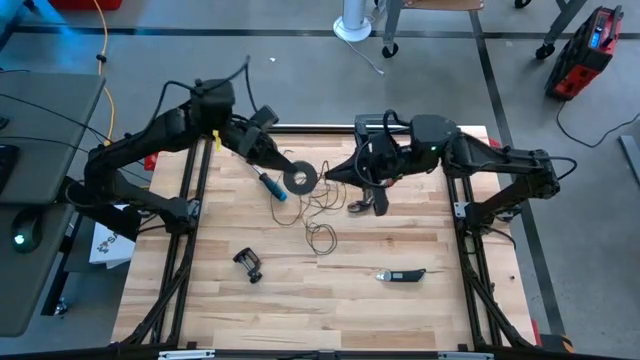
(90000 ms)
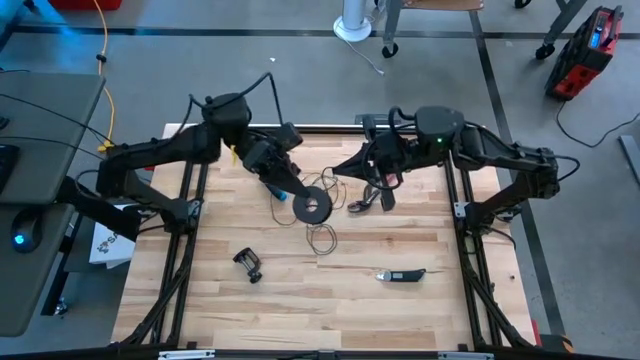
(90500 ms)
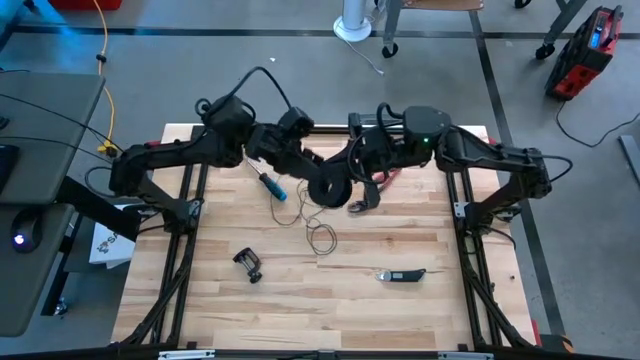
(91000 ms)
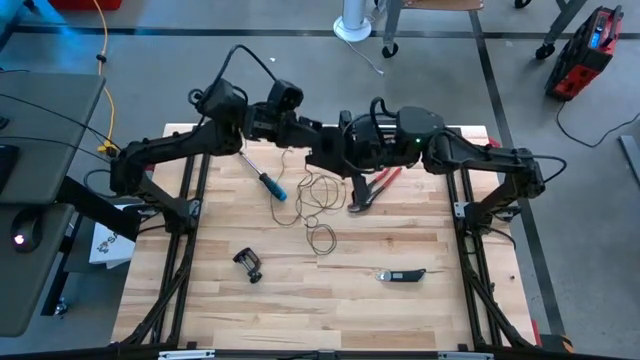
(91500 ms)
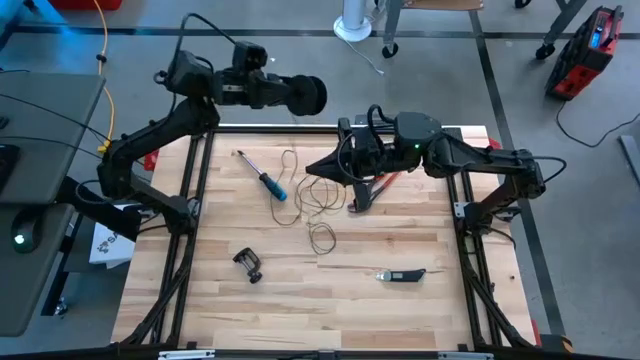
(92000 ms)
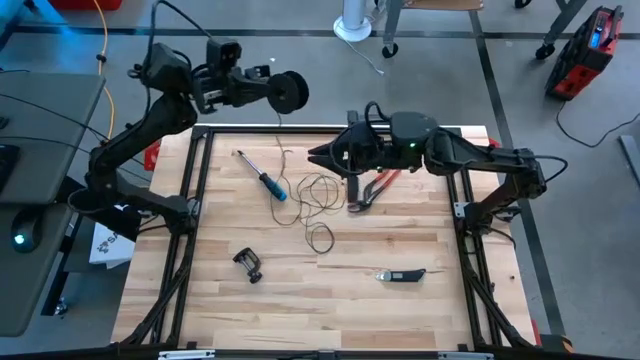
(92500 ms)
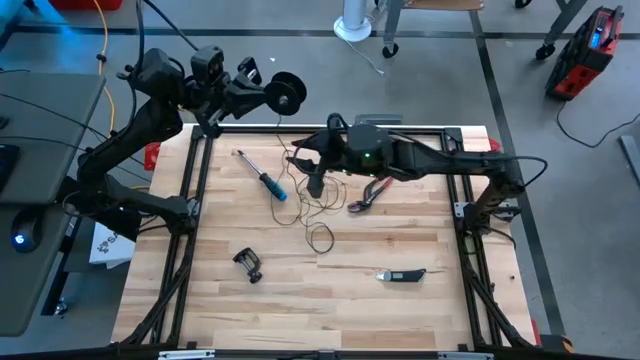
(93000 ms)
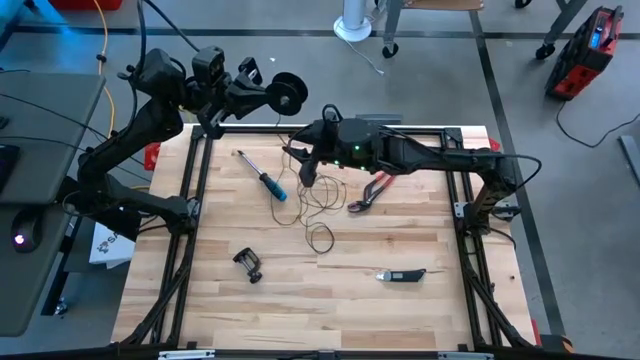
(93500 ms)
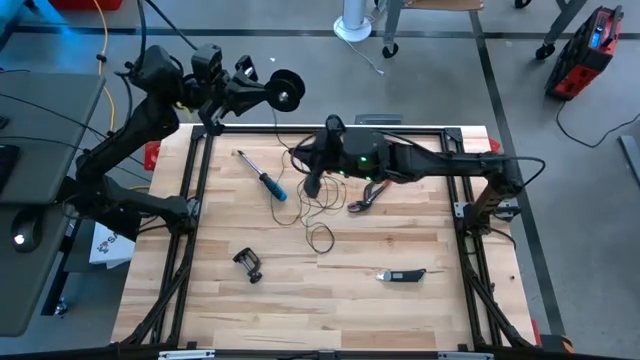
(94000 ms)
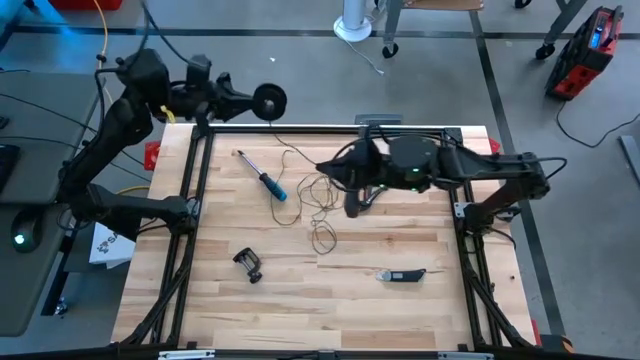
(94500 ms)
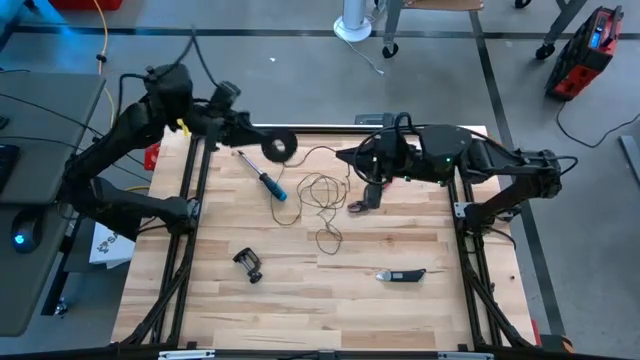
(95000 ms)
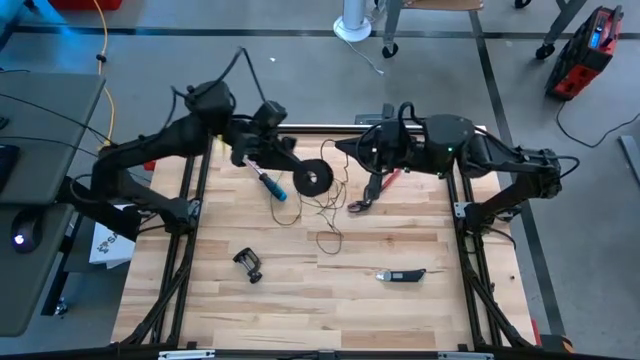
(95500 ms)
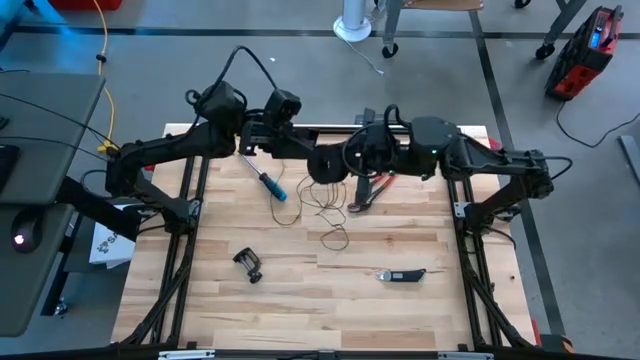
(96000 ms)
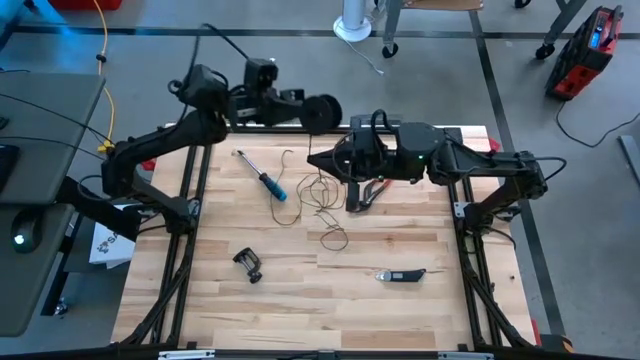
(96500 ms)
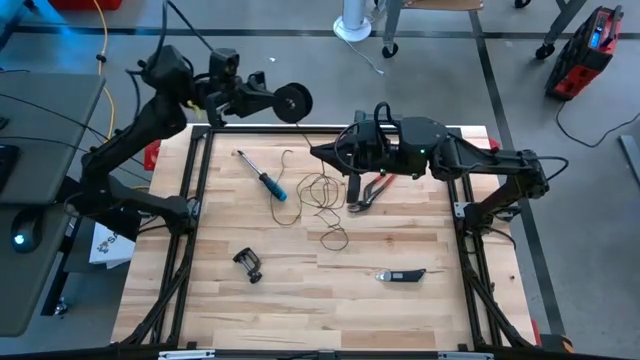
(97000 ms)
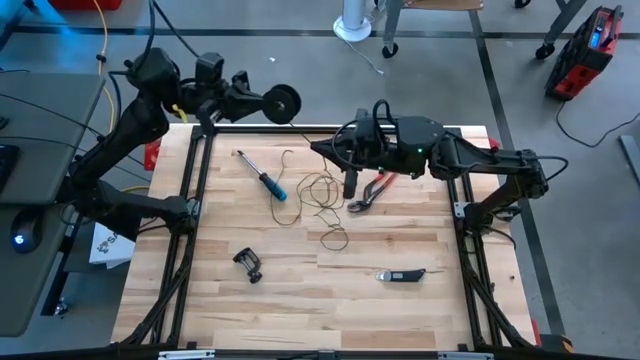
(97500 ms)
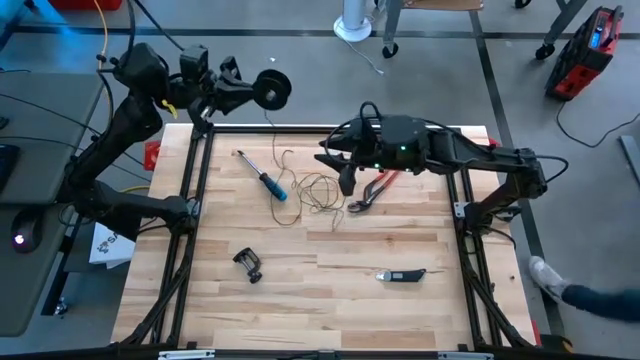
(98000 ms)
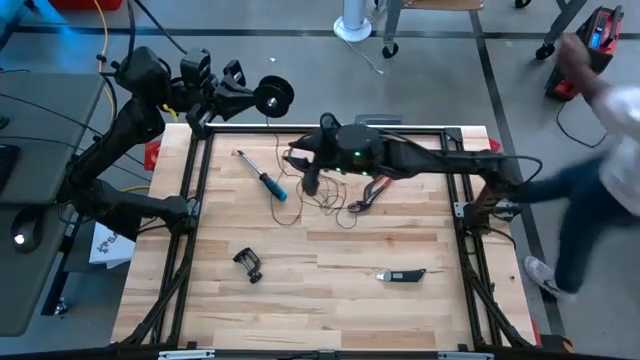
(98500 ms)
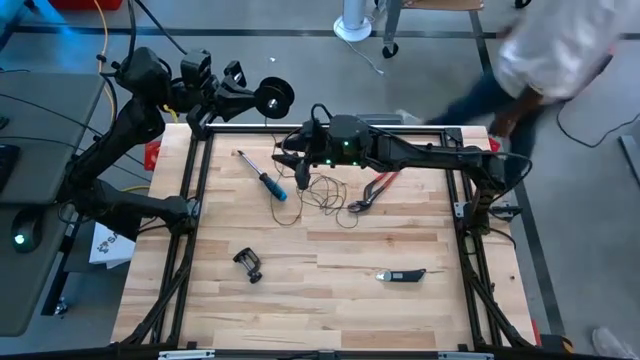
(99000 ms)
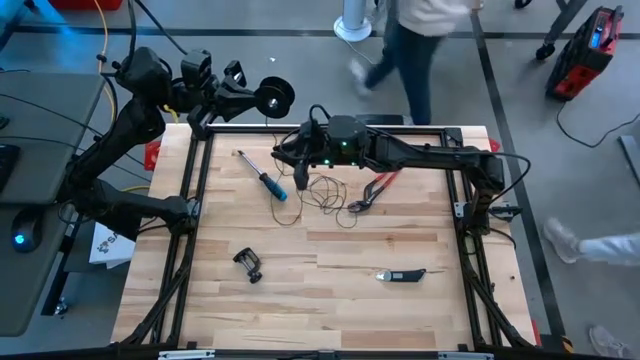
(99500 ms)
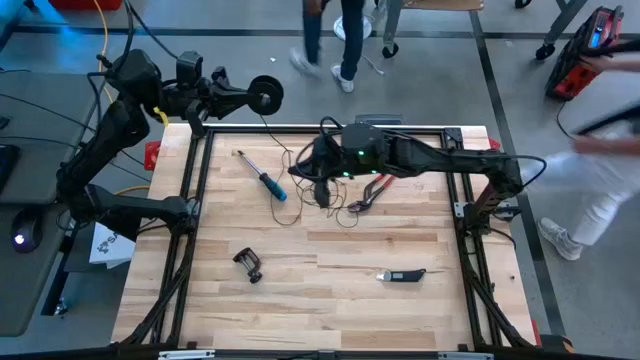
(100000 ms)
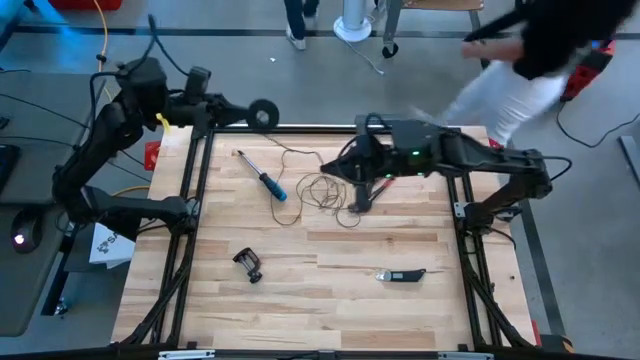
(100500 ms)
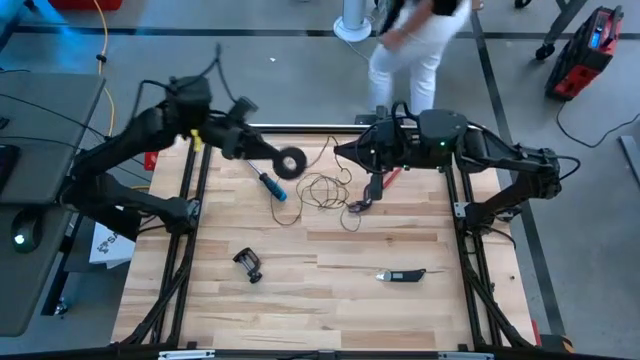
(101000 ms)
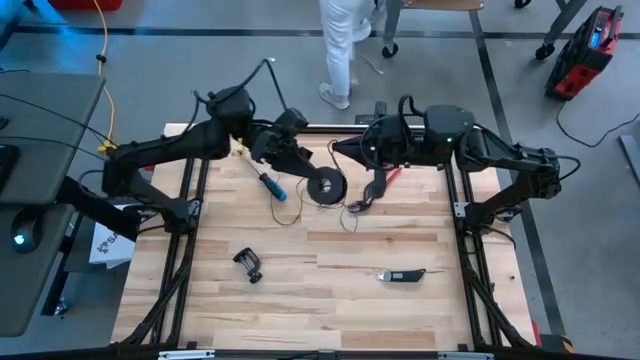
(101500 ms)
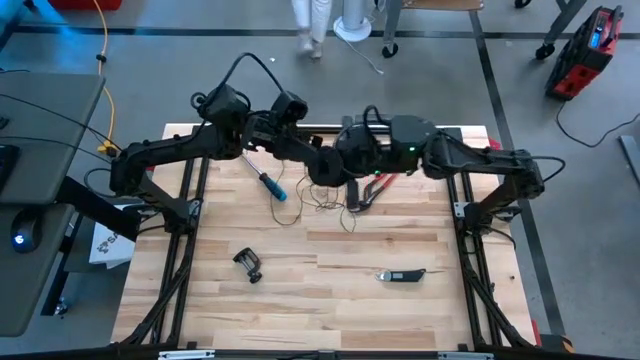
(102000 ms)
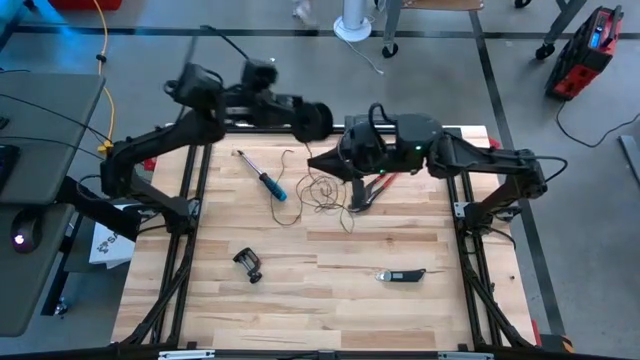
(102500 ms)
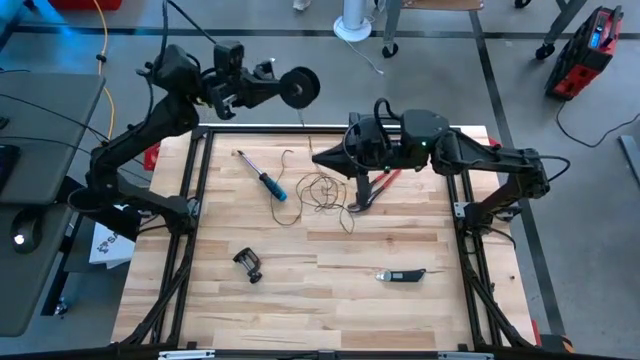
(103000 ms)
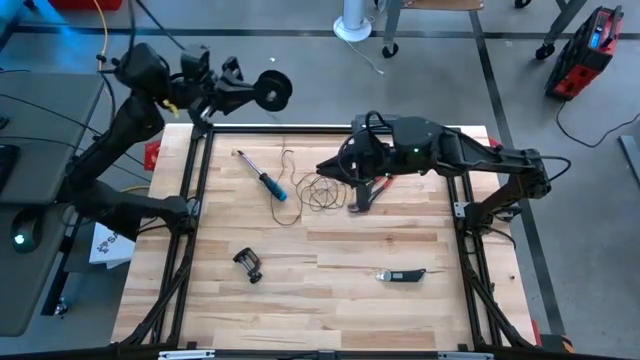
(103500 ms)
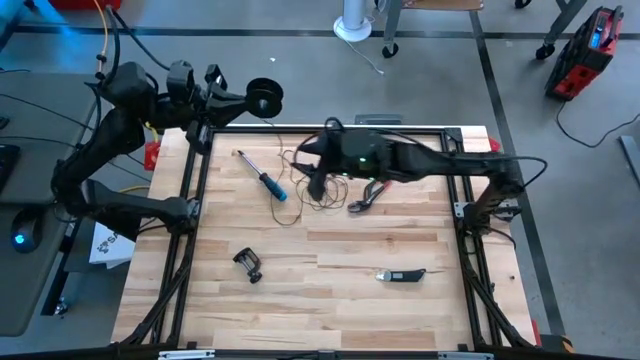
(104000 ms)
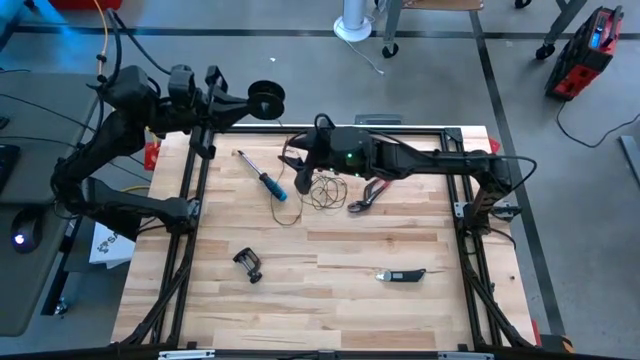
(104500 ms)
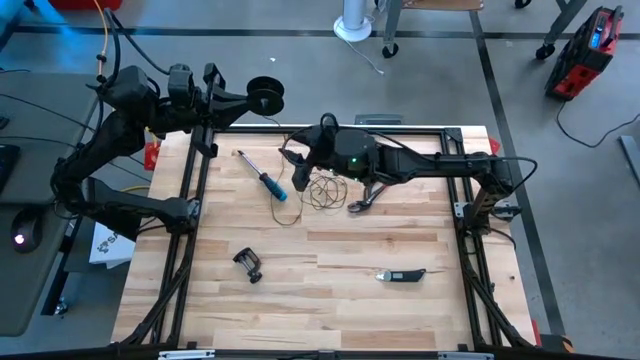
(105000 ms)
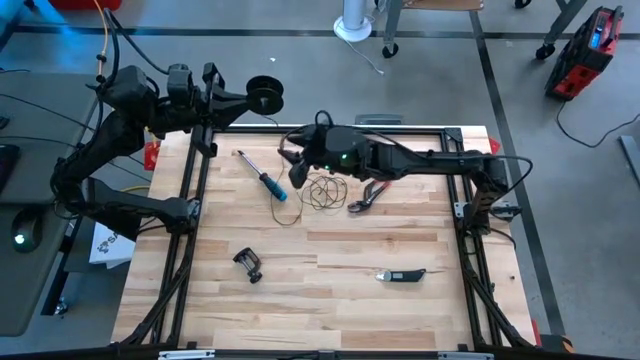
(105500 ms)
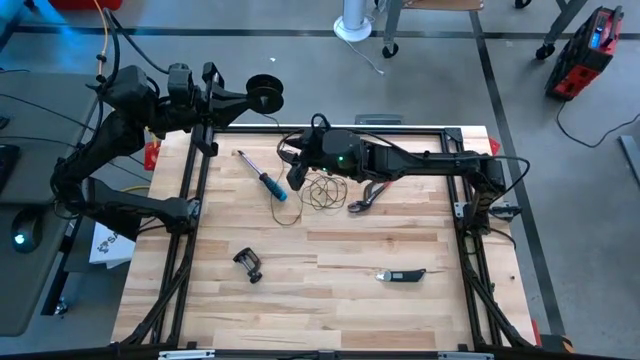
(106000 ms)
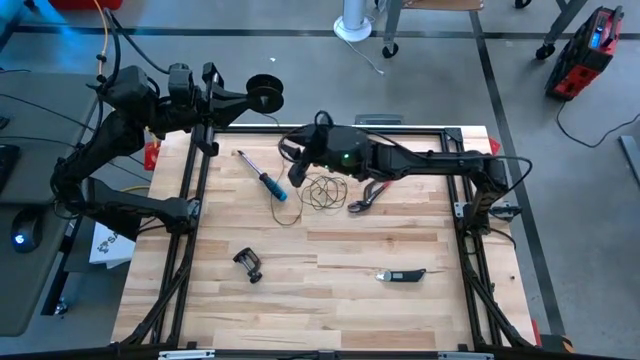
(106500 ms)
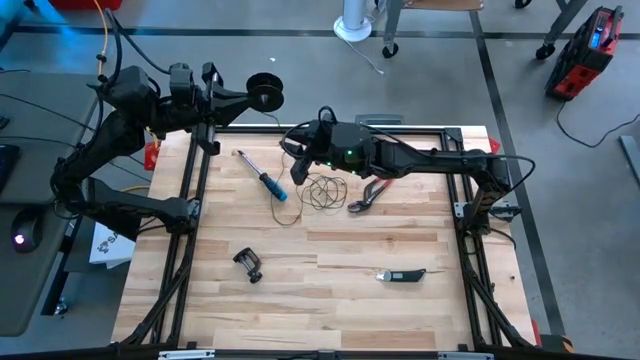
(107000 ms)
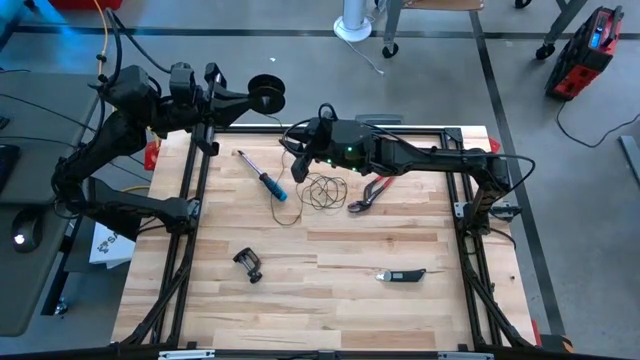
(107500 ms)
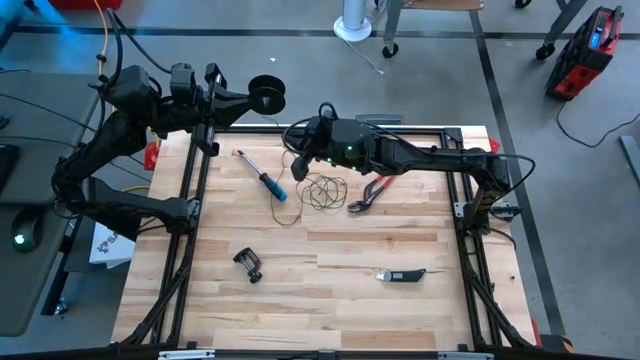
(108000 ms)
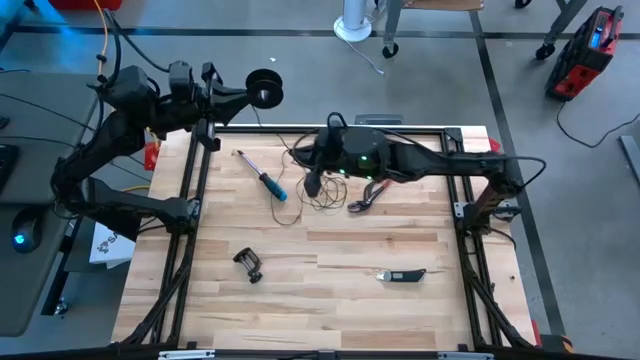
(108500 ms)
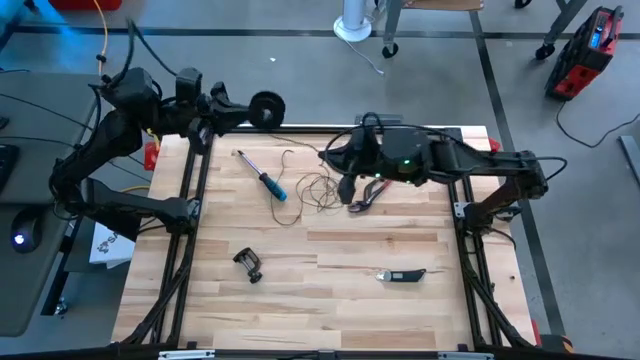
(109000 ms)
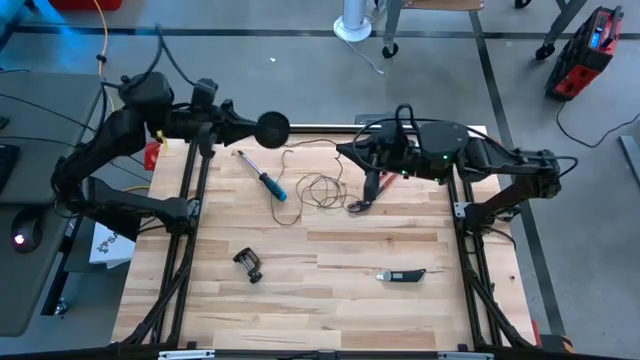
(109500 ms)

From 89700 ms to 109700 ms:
Task: Coil cords
Coil the black wire onto the black spool
